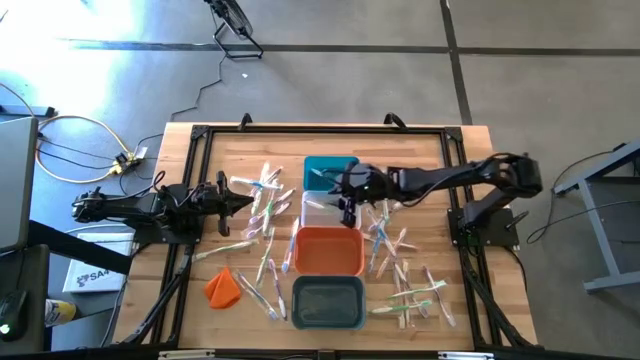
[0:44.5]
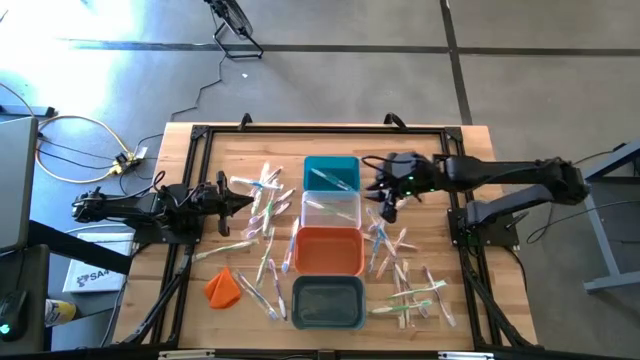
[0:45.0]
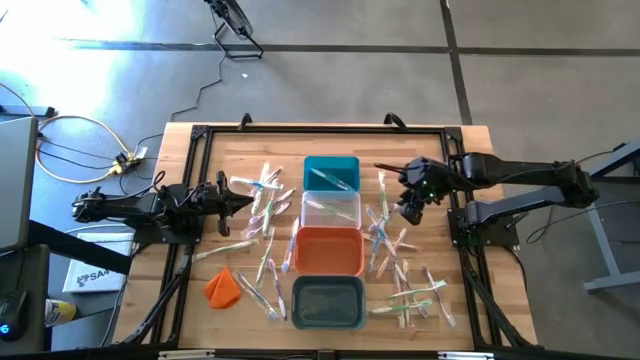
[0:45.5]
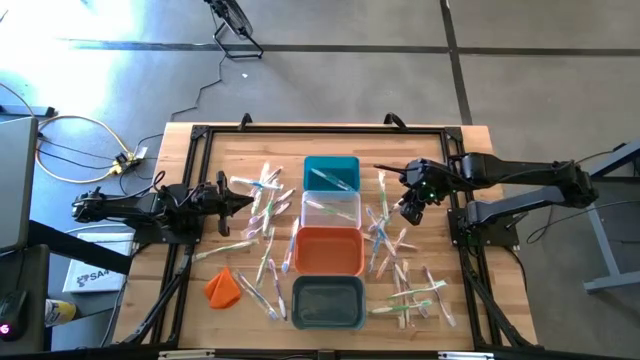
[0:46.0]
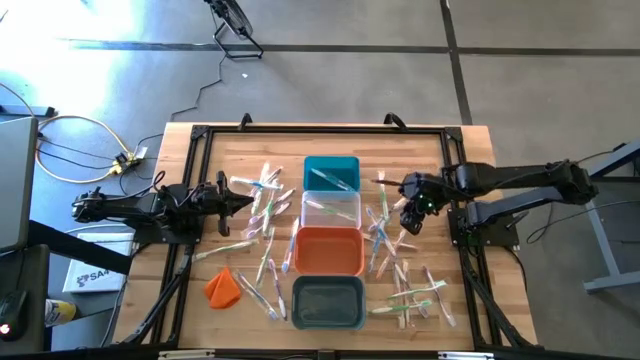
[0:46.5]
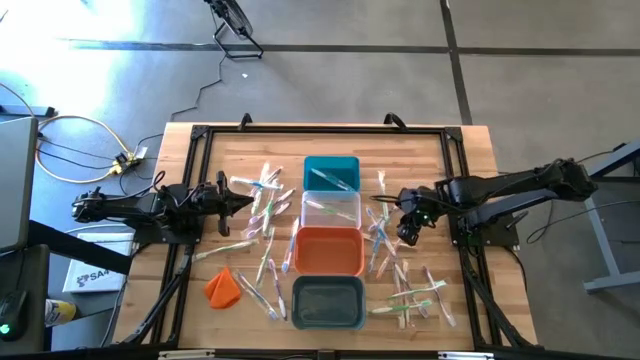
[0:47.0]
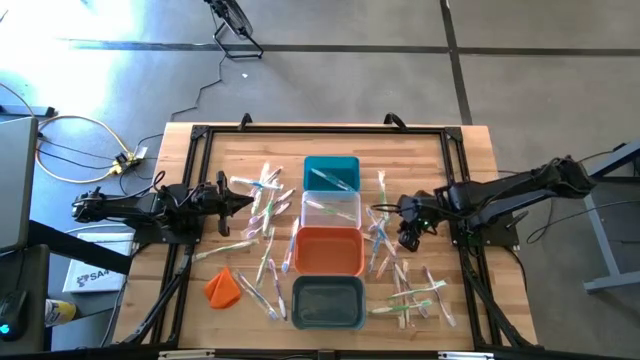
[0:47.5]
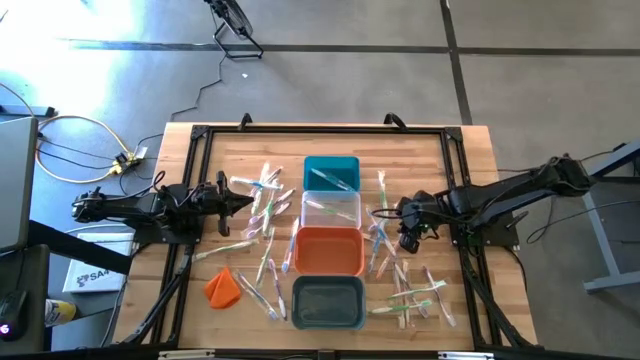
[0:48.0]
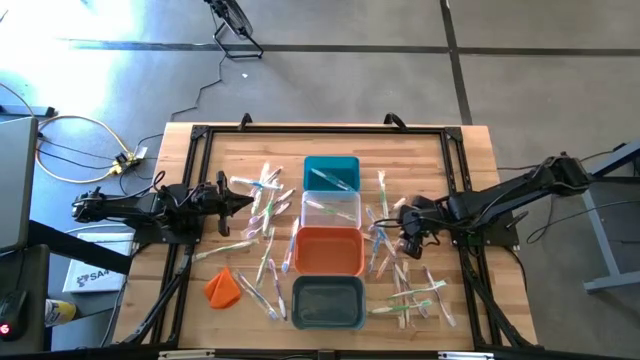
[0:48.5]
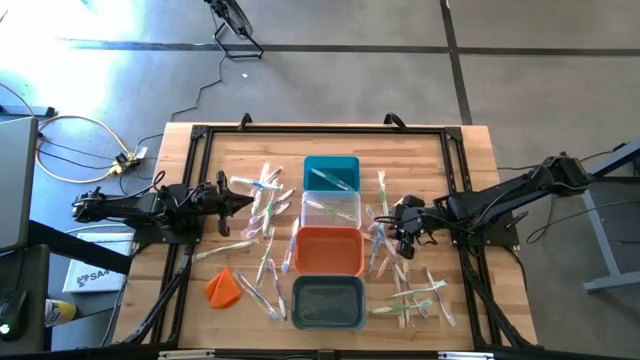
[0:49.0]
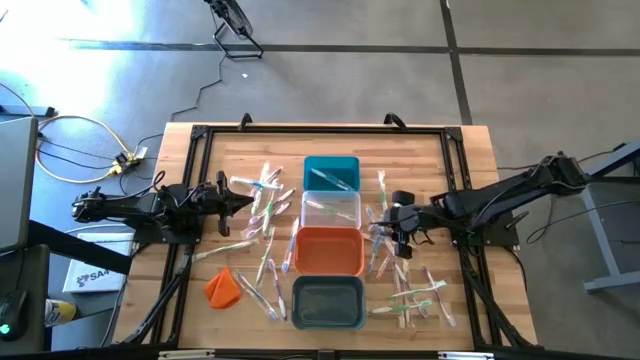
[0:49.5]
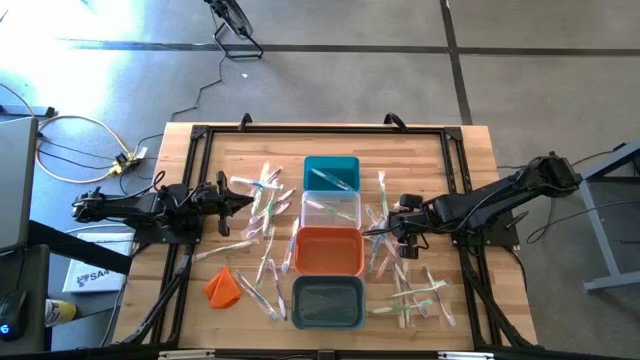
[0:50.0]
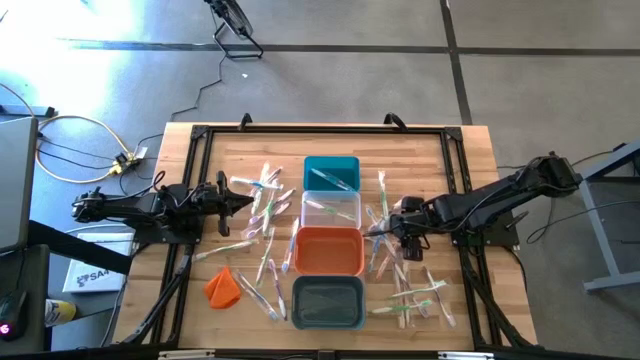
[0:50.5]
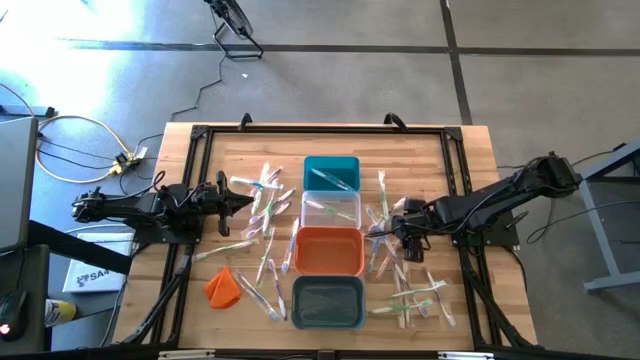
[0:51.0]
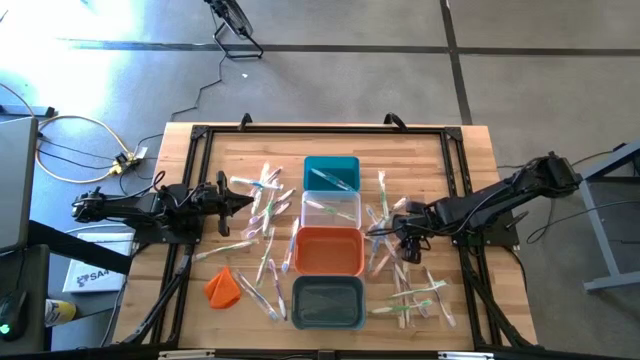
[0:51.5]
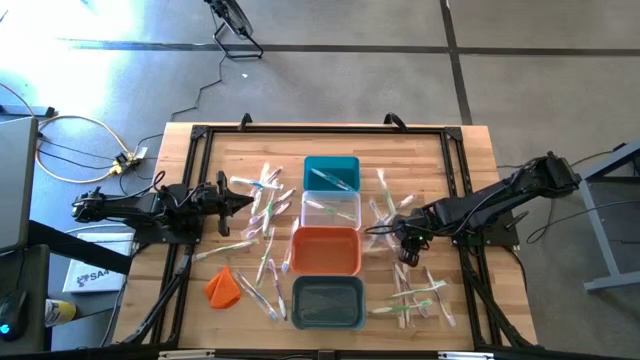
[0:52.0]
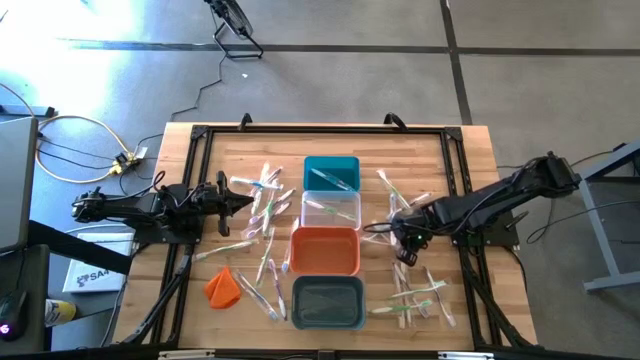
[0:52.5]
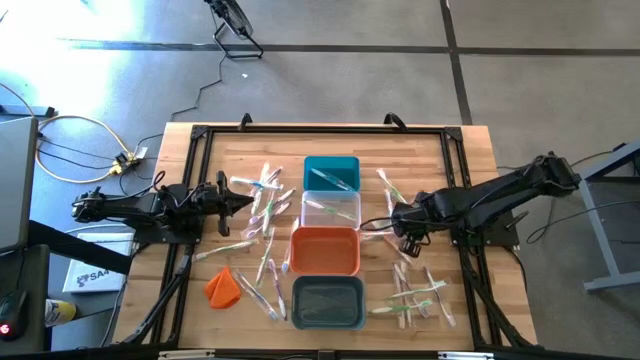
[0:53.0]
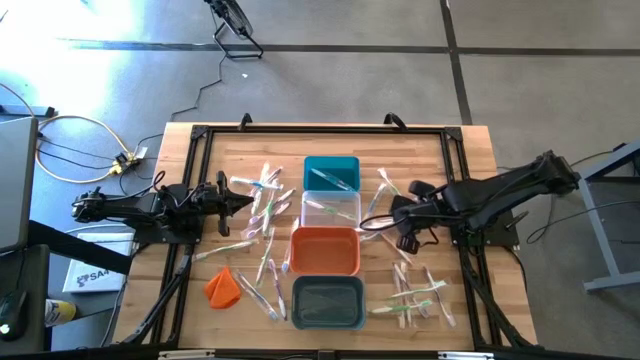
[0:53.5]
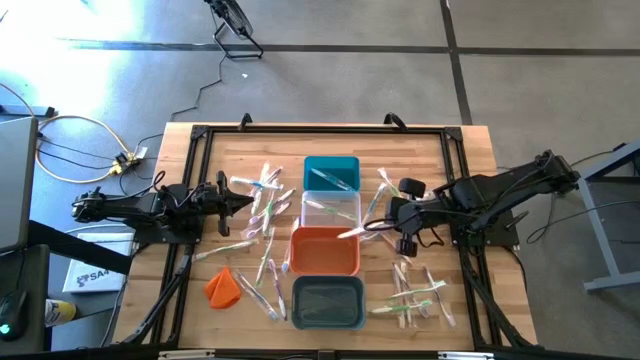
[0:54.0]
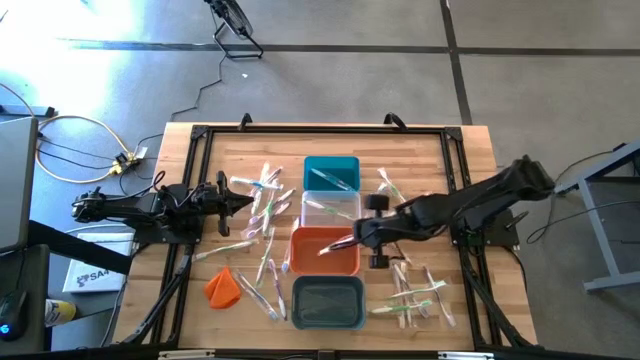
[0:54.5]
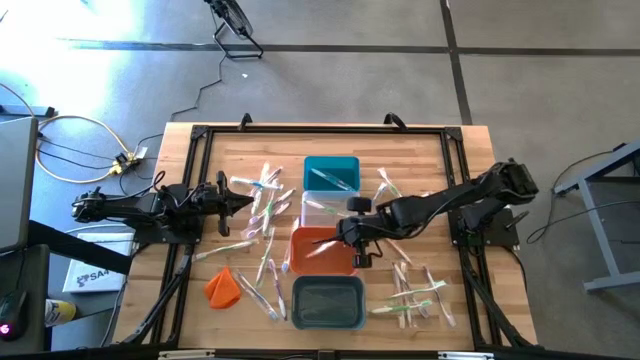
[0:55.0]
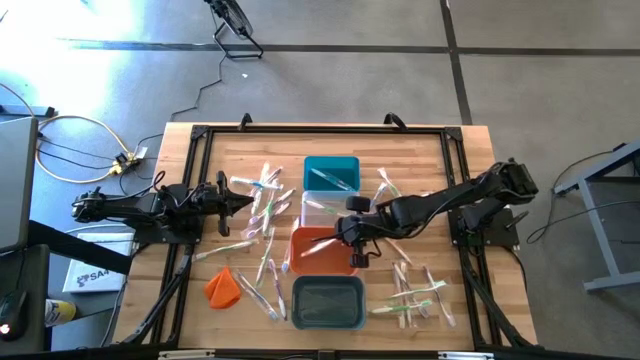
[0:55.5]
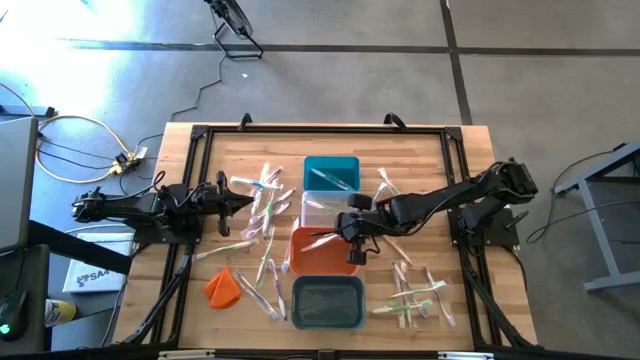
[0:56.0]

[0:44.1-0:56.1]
Task: Pick & Place Toothbrushes
Put the orange toothbrush into the orange bin

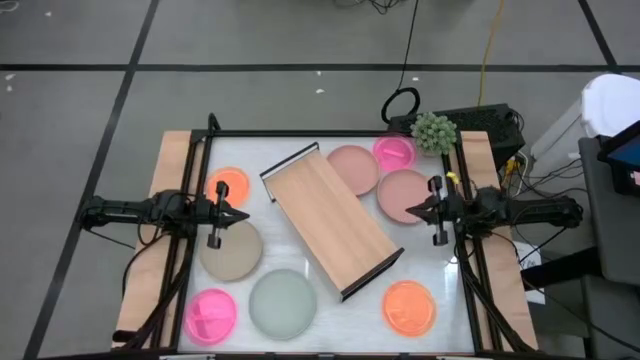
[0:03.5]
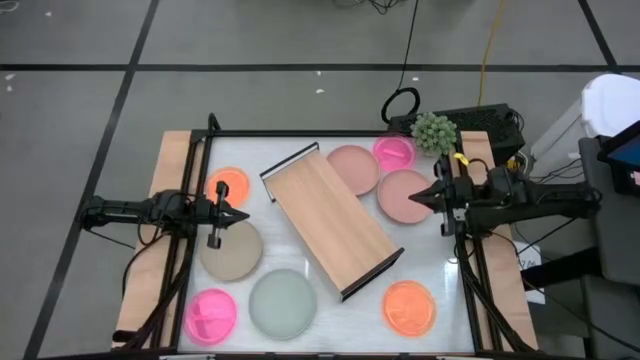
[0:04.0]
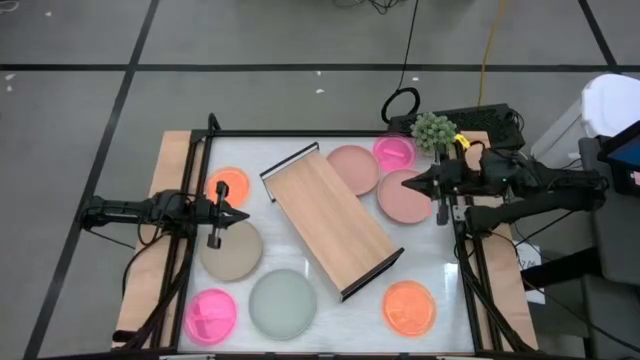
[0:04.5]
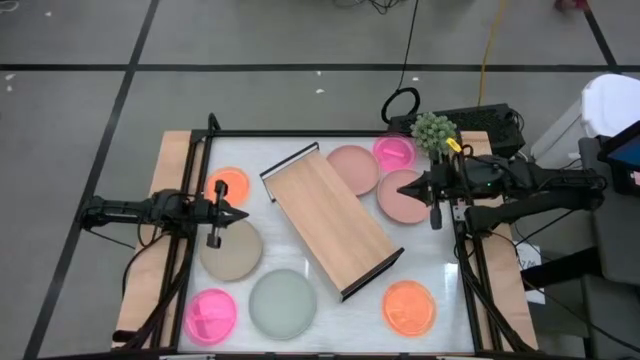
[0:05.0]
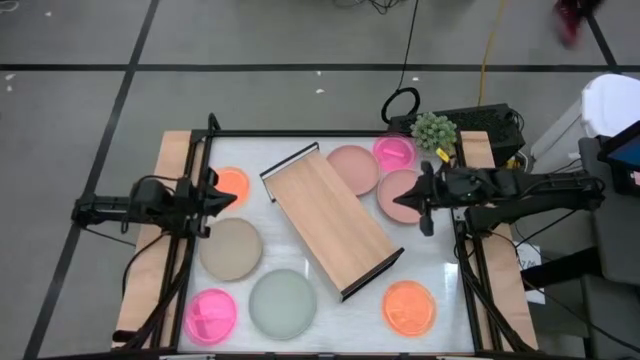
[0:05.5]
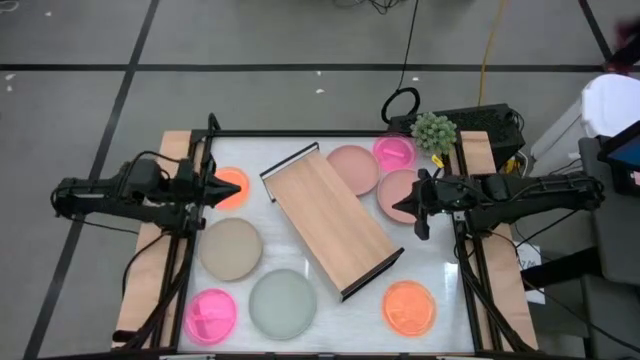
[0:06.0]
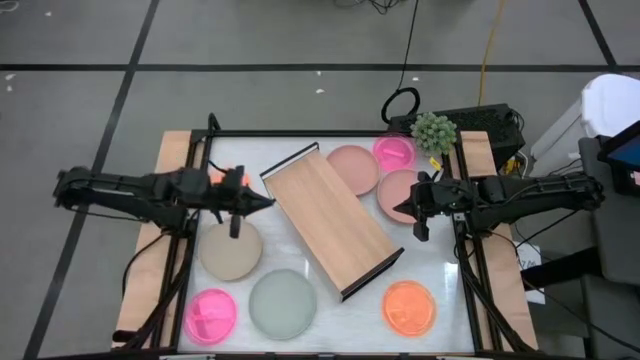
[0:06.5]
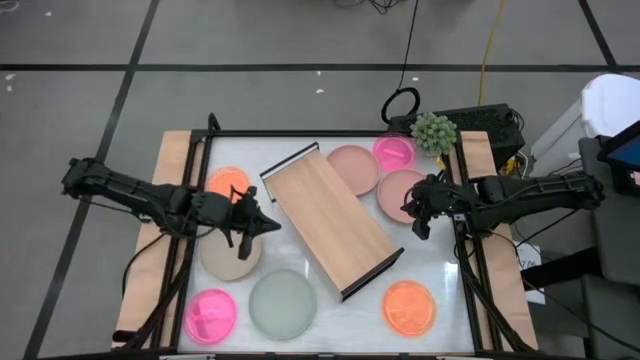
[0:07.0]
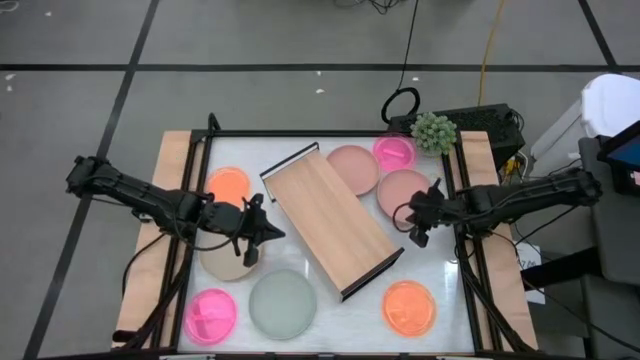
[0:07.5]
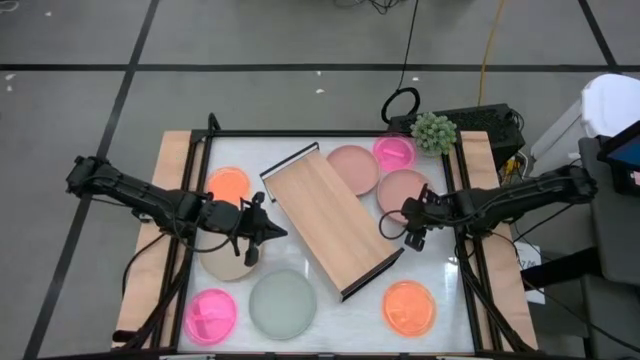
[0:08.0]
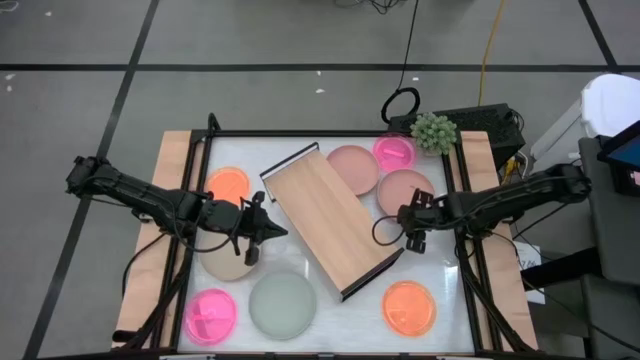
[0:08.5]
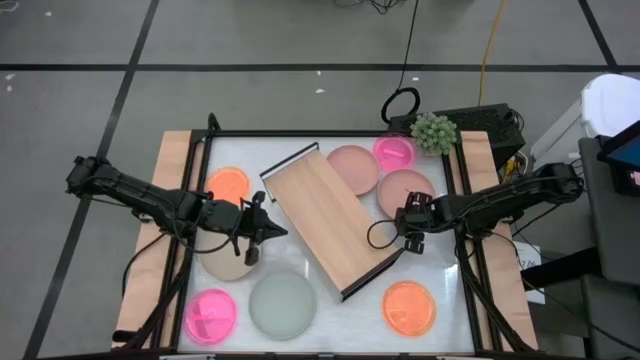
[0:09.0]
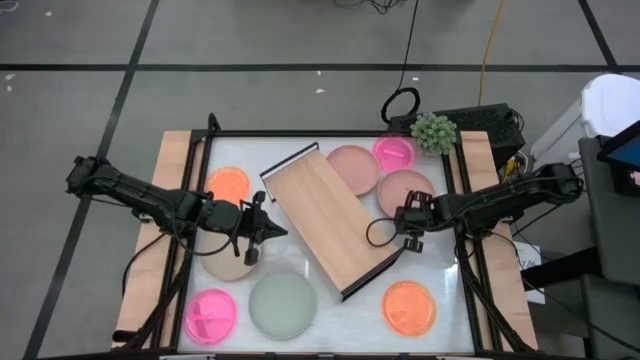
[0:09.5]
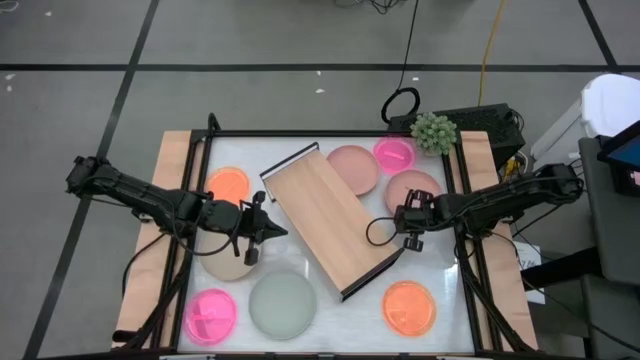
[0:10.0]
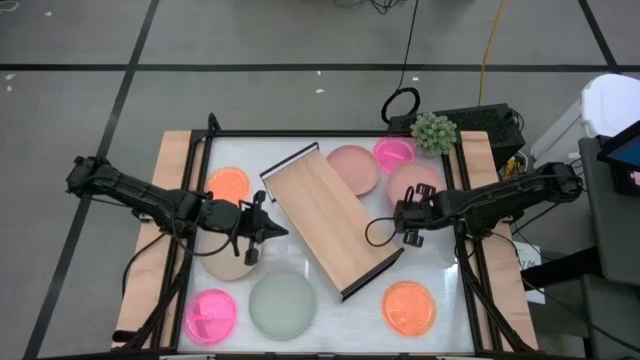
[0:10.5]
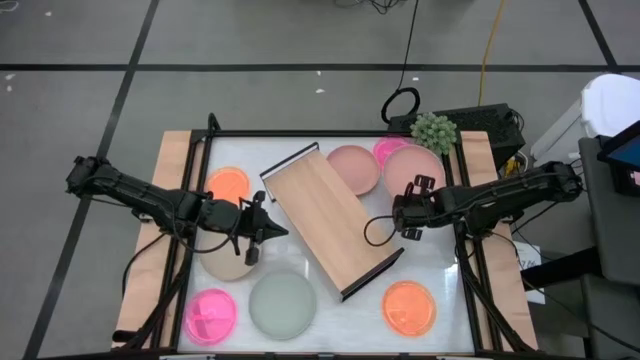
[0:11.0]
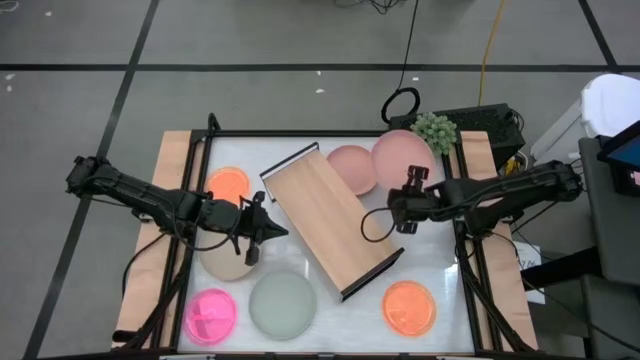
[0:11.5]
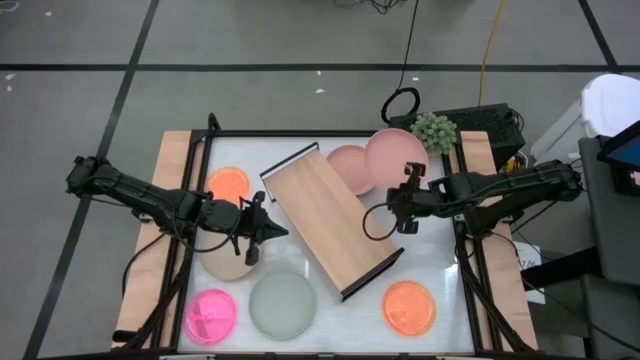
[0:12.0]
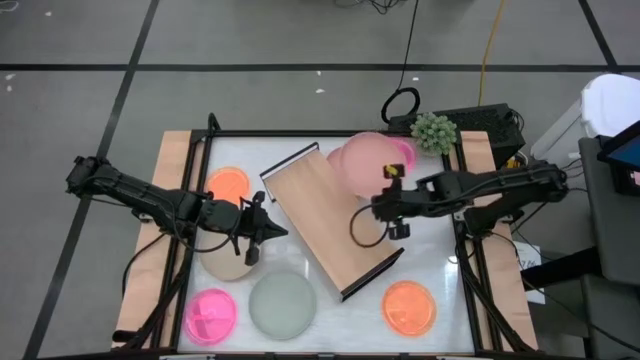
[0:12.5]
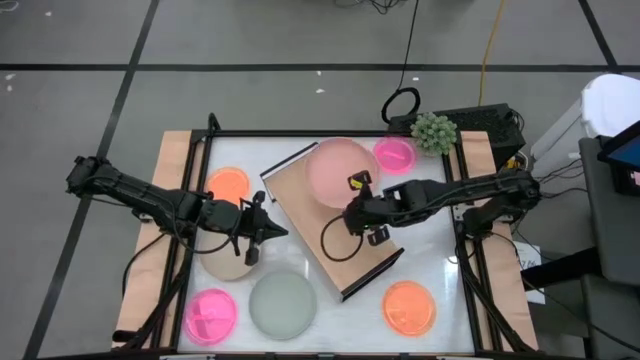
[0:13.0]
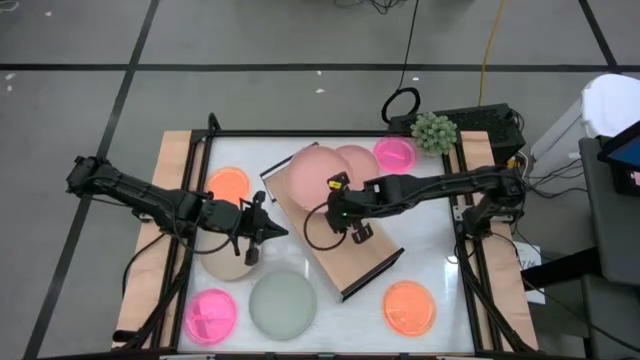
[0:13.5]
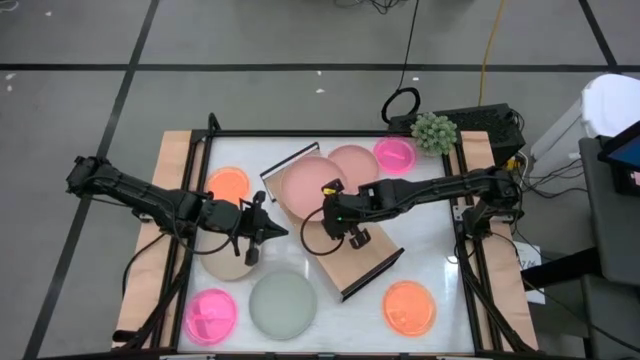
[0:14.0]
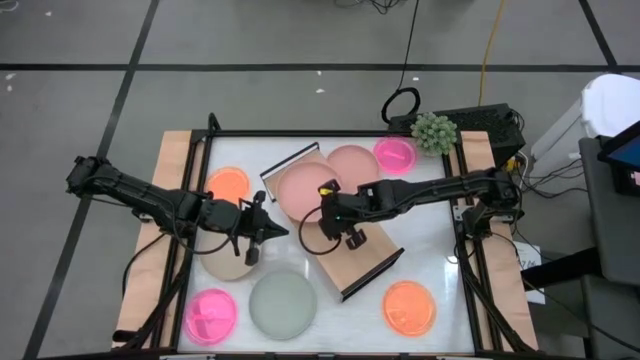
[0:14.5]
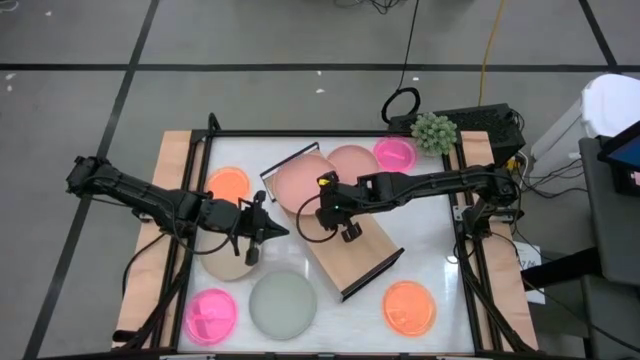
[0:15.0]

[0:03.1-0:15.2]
Task: Place and stack plates onto a shelf
Put the right large pink plate on the shelf
